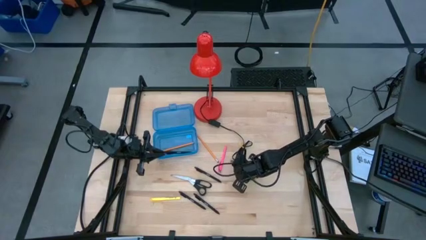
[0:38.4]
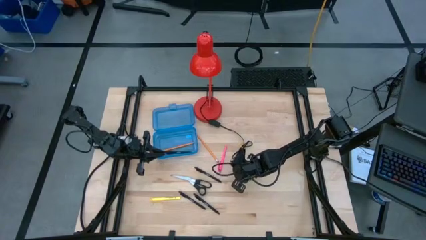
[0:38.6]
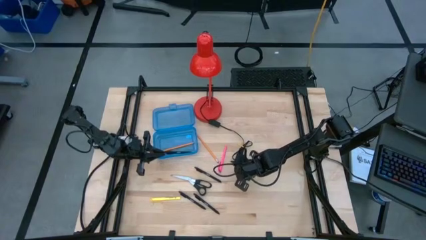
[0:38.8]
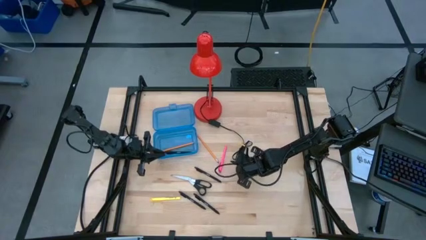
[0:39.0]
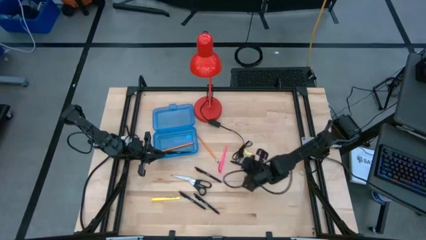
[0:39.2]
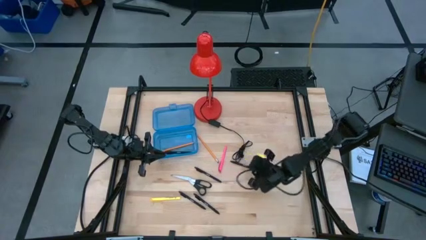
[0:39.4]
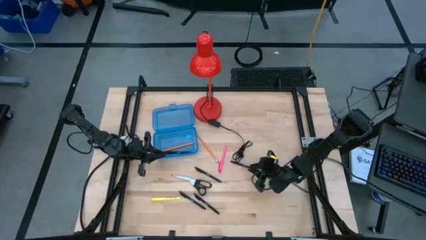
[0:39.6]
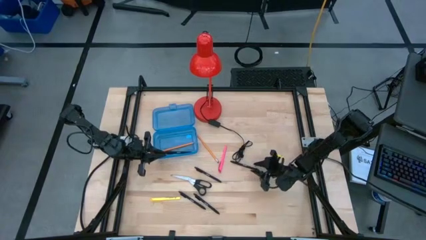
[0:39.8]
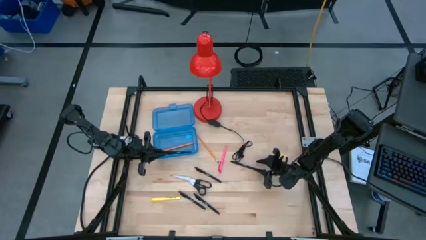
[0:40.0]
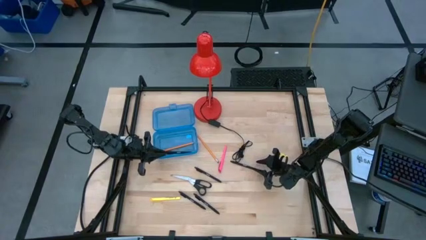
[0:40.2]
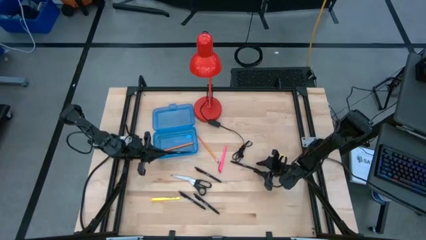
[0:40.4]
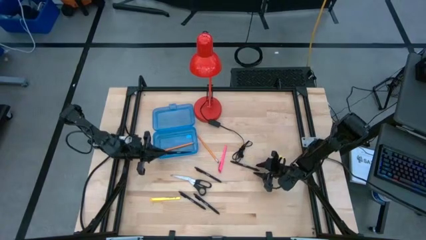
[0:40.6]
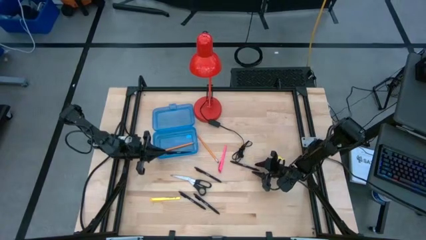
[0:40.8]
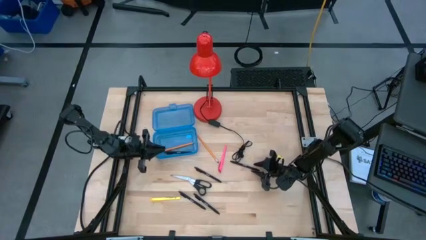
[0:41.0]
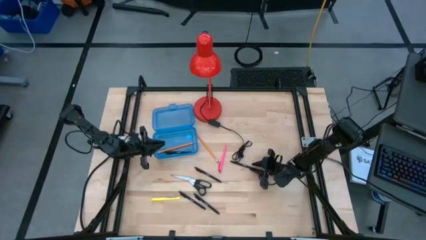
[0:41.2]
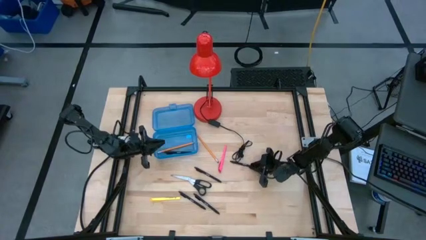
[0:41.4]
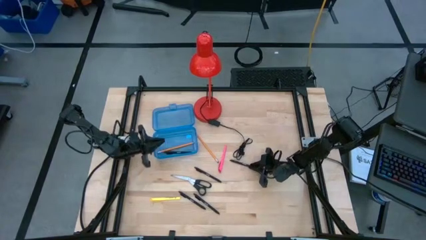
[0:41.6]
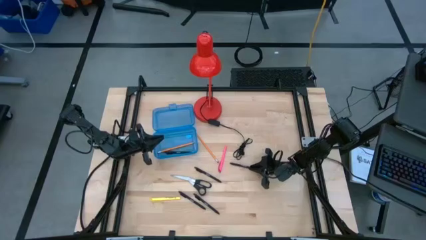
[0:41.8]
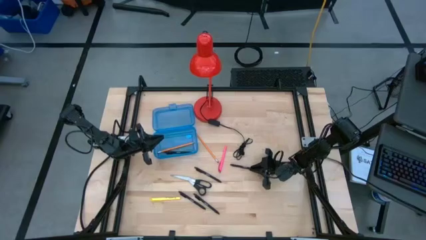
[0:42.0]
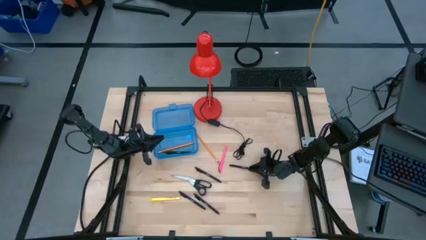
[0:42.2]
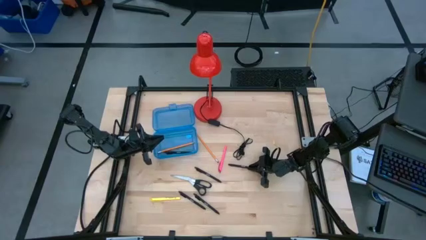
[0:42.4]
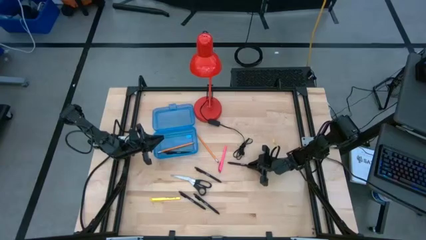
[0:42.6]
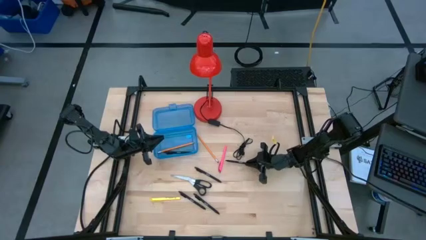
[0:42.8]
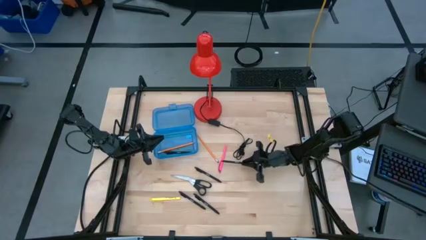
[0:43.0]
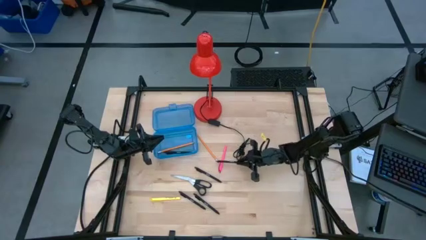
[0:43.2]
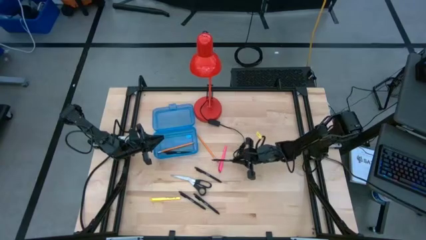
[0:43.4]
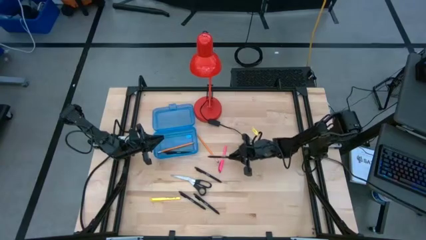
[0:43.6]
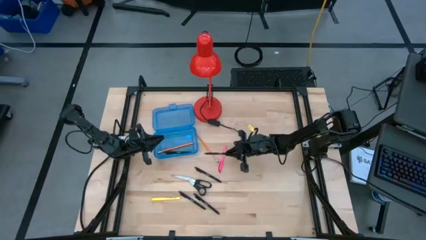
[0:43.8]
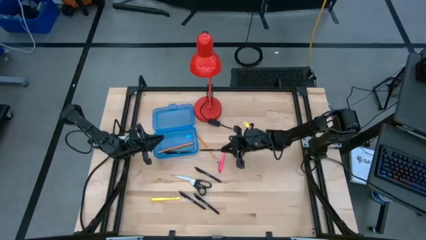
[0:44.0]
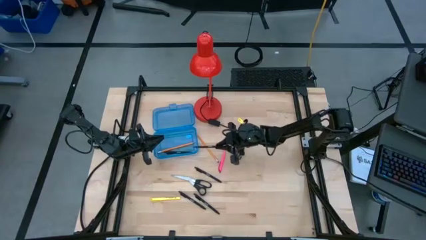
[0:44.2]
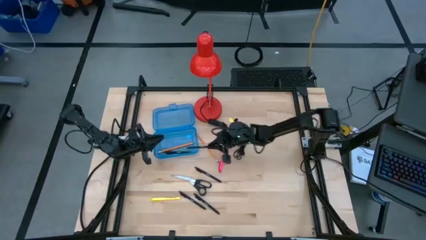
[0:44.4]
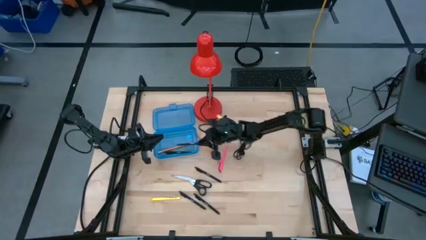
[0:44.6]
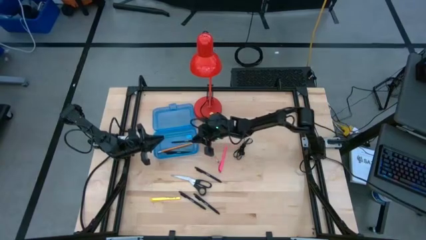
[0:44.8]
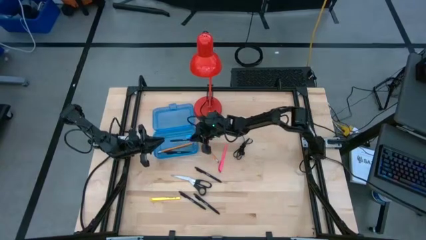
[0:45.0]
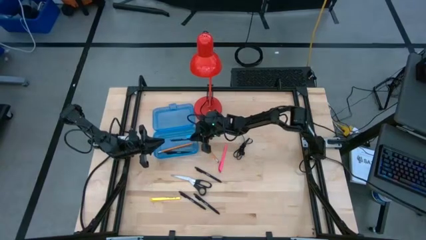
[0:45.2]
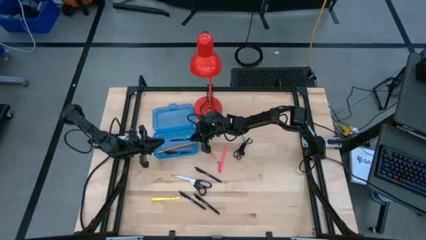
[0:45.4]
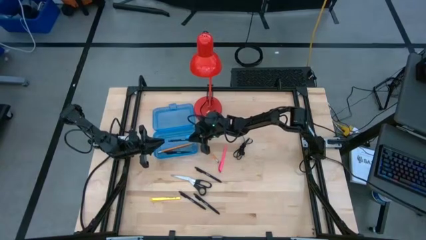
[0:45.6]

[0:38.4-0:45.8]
Task: Pick & place school supplies into a supply box
Put the black pen into the blue supply box

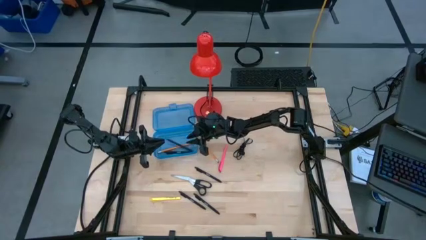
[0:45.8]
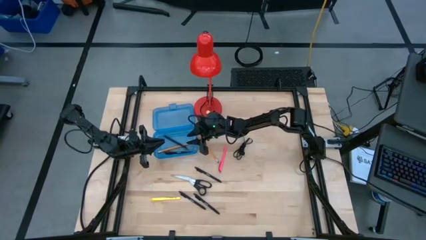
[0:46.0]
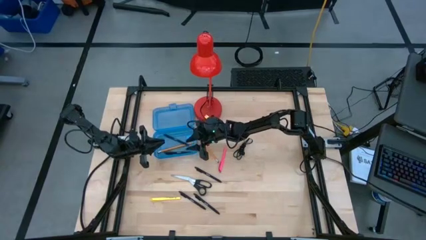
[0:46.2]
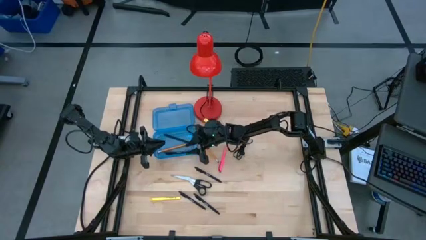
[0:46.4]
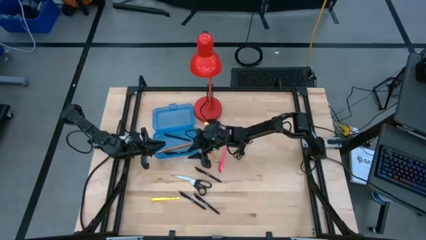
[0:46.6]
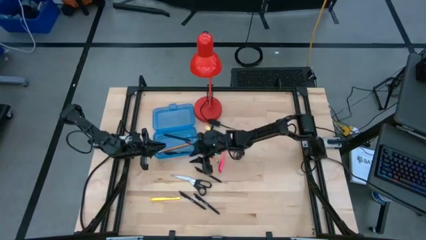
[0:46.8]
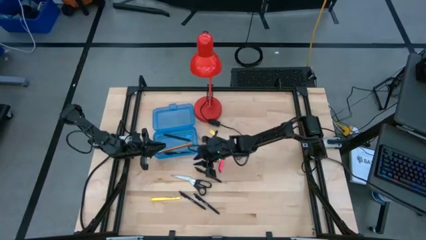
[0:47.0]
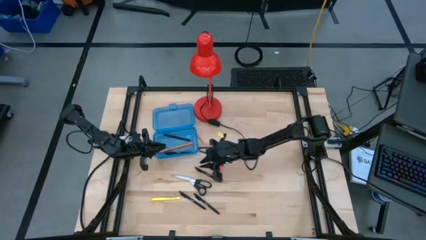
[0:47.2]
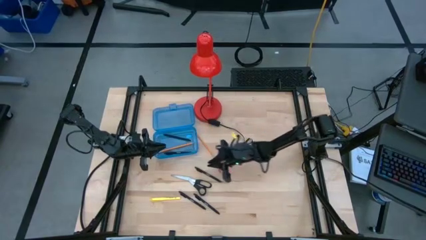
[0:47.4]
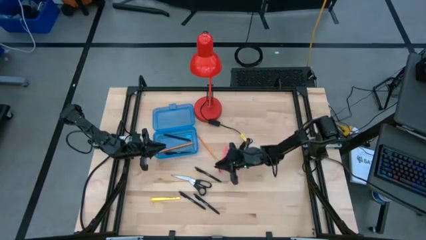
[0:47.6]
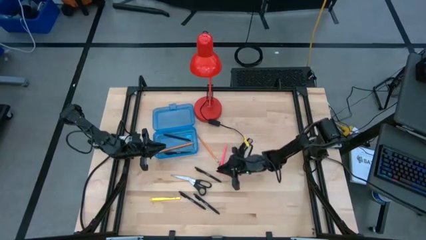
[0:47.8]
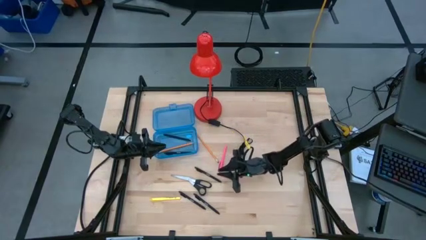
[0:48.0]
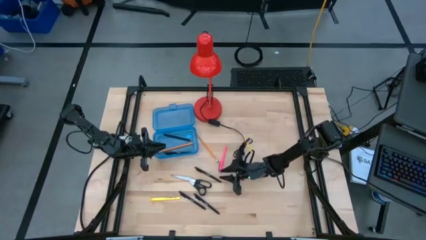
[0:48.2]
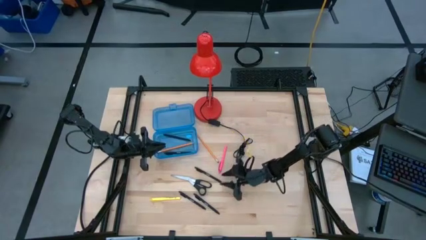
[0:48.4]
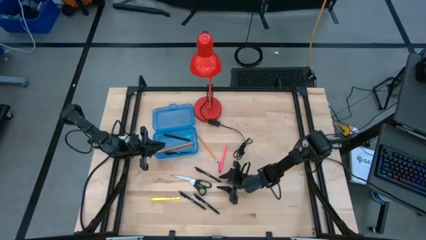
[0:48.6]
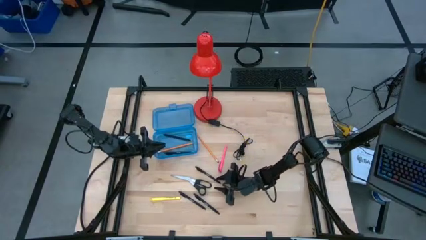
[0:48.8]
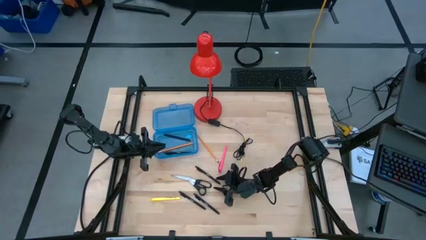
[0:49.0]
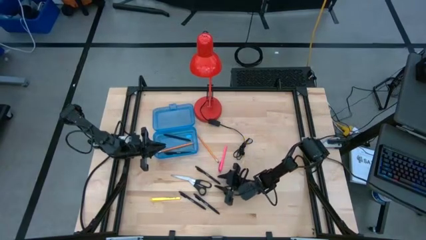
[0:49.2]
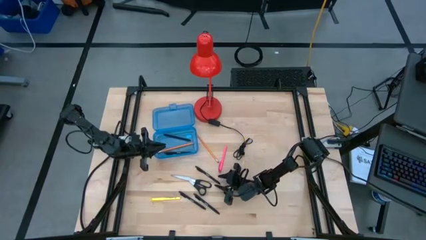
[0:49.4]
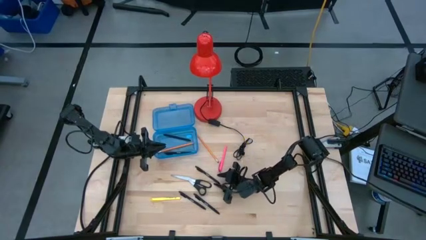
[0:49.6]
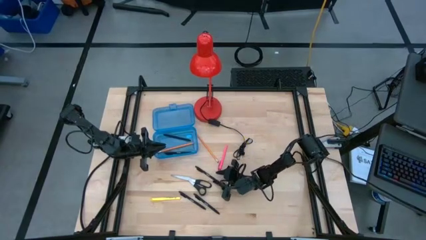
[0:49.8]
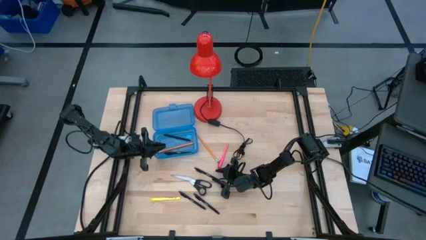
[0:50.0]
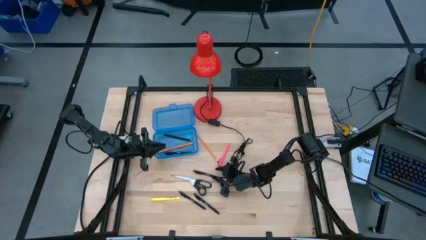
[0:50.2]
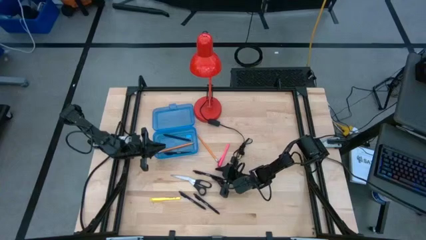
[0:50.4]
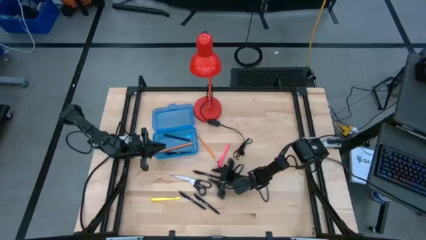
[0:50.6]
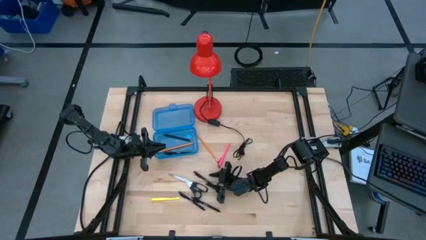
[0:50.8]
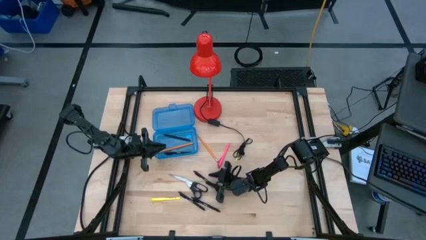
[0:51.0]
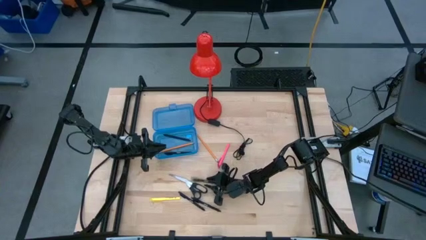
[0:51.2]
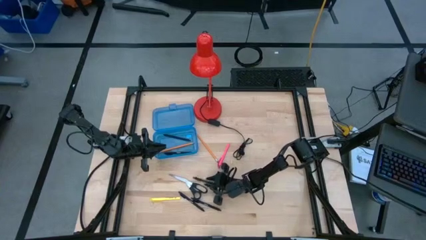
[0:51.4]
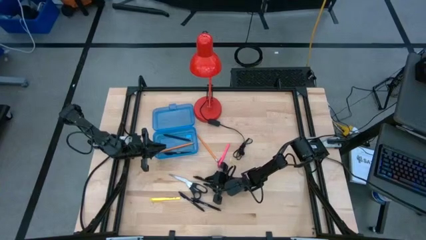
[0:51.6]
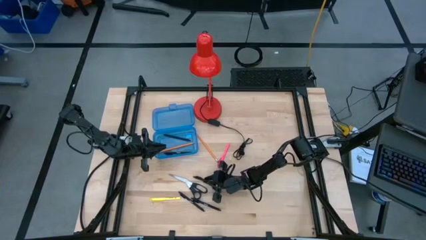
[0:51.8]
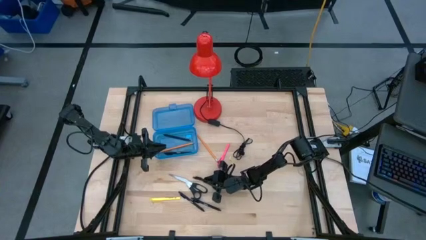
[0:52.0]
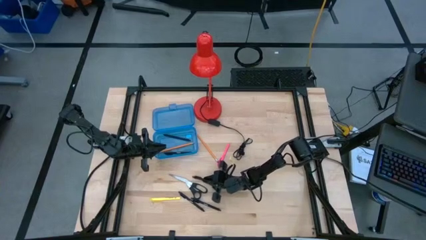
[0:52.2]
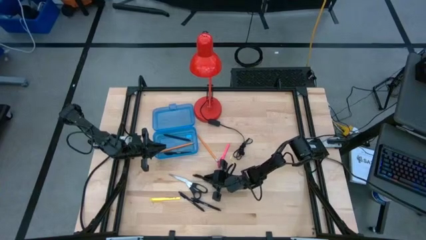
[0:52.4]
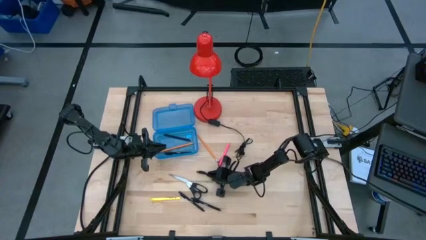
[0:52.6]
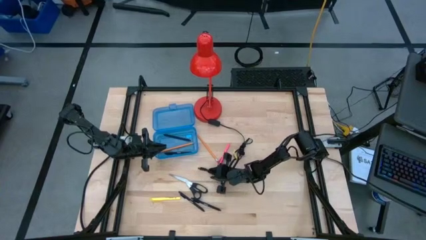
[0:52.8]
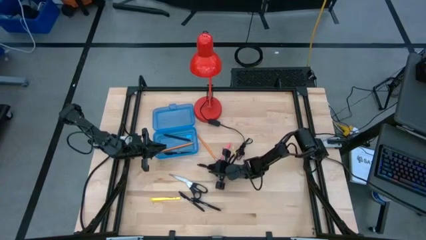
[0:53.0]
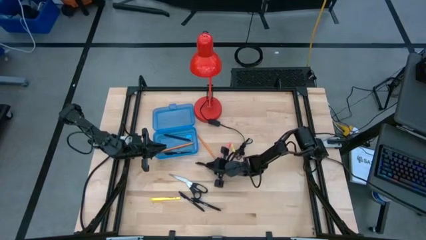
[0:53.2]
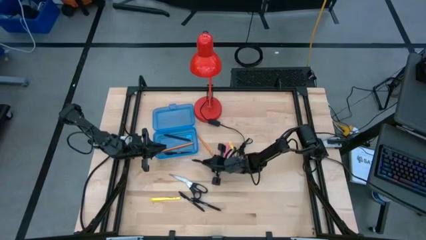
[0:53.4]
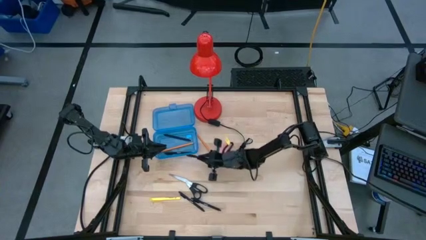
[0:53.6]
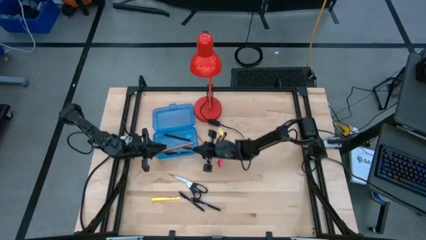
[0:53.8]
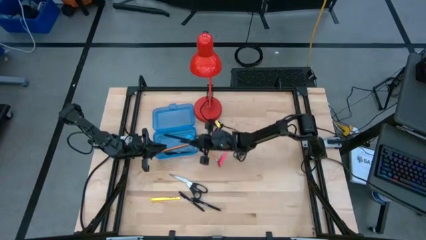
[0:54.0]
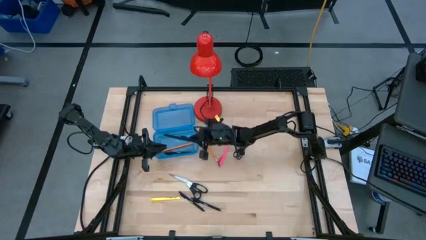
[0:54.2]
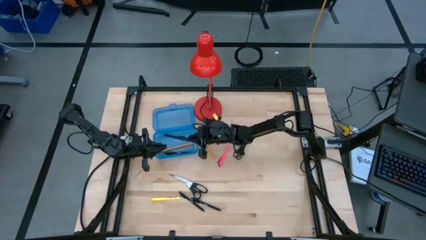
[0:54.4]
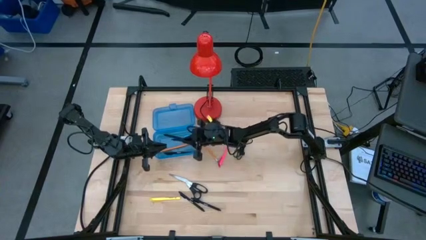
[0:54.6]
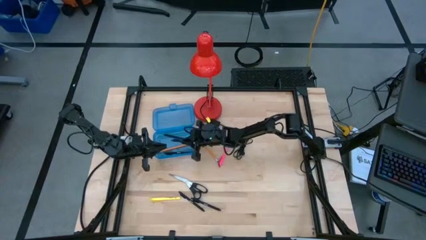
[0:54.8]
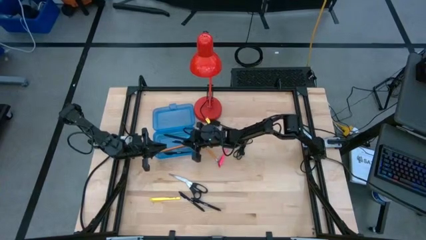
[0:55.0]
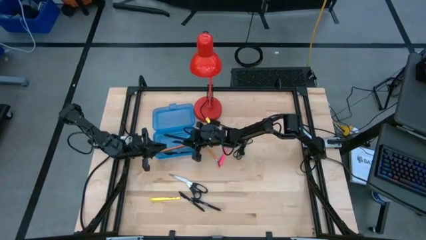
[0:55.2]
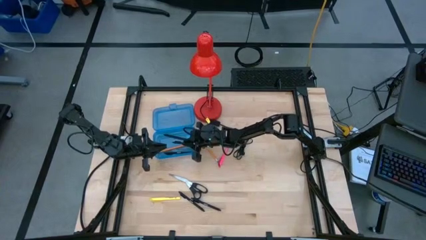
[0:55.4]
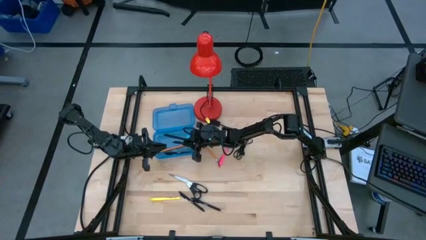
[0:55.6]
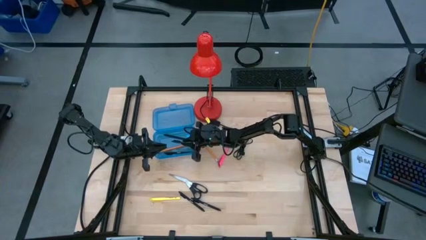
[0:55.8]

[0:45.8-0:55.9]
Put the black pen into the blue supply box
